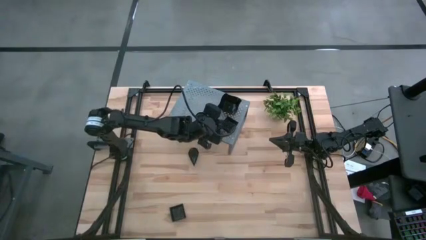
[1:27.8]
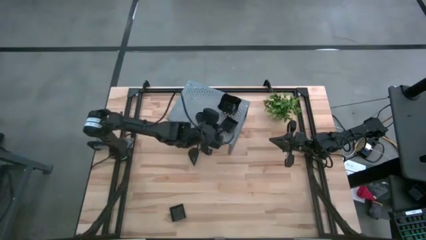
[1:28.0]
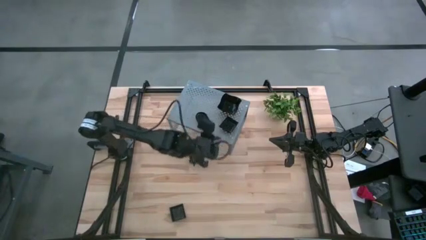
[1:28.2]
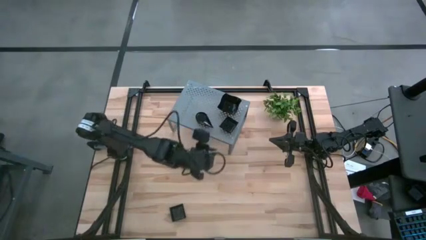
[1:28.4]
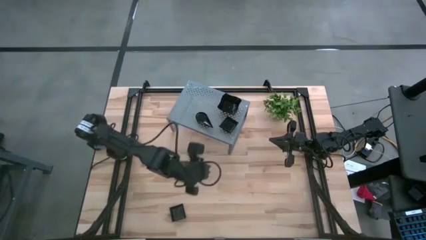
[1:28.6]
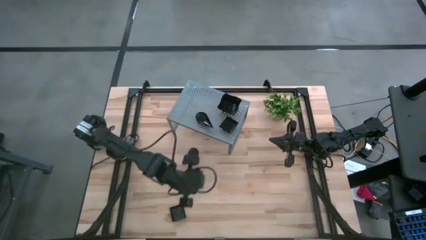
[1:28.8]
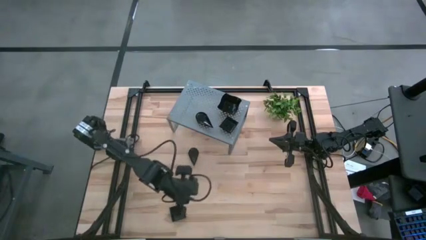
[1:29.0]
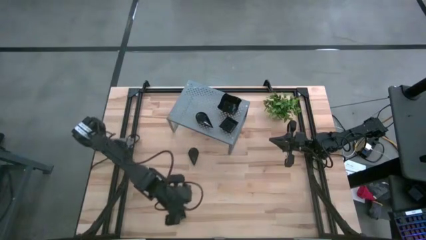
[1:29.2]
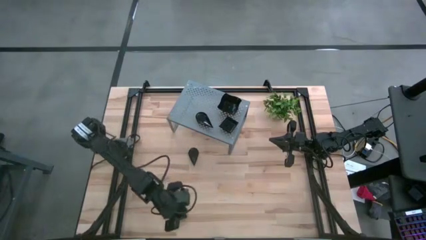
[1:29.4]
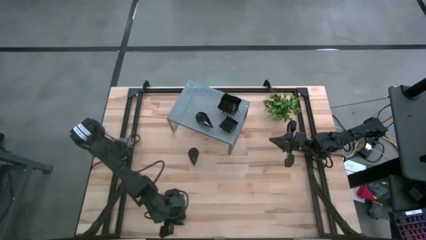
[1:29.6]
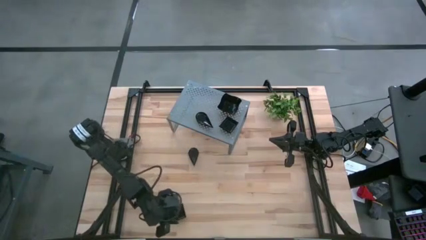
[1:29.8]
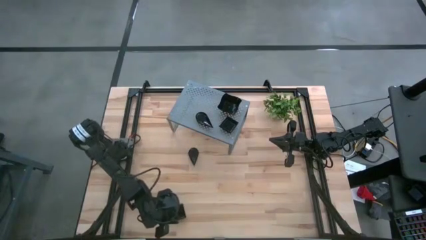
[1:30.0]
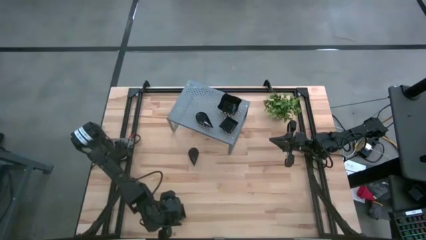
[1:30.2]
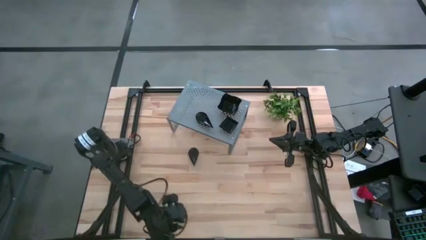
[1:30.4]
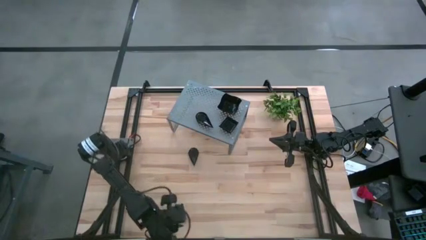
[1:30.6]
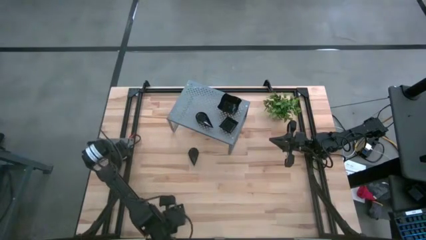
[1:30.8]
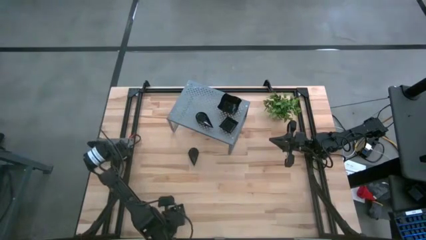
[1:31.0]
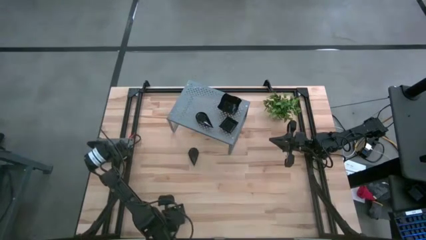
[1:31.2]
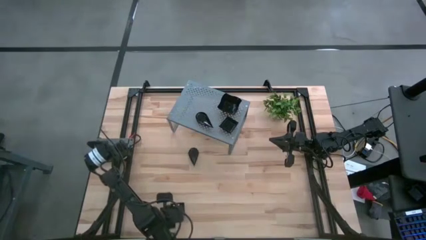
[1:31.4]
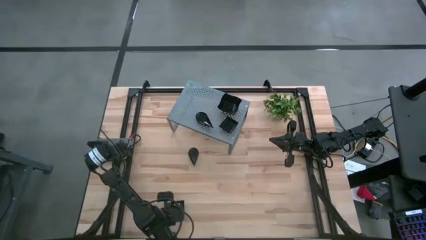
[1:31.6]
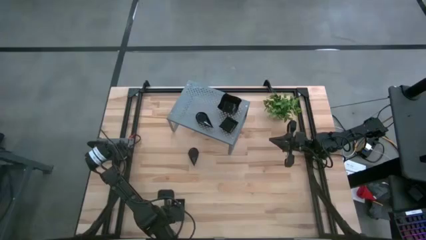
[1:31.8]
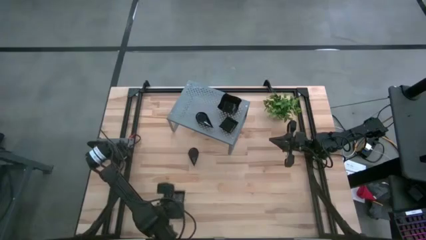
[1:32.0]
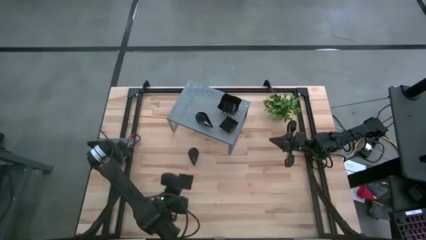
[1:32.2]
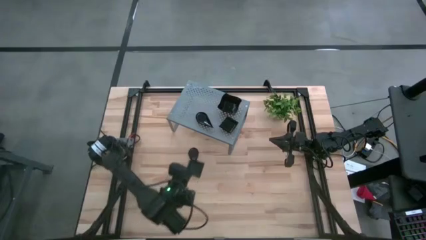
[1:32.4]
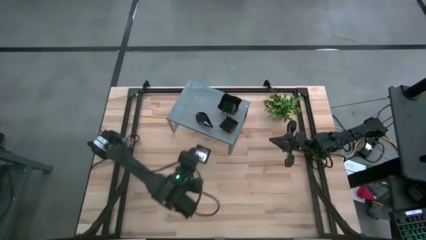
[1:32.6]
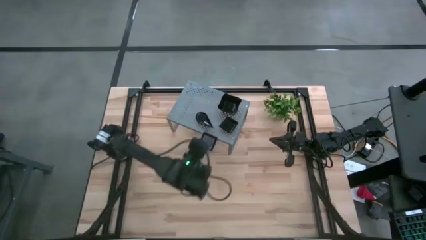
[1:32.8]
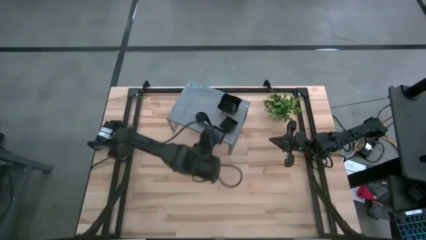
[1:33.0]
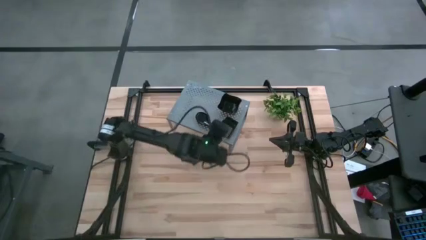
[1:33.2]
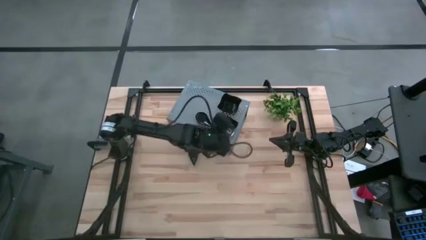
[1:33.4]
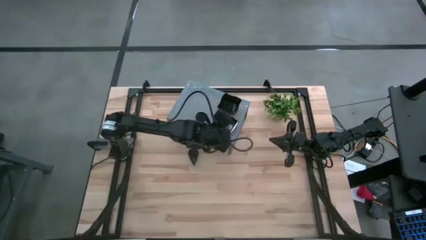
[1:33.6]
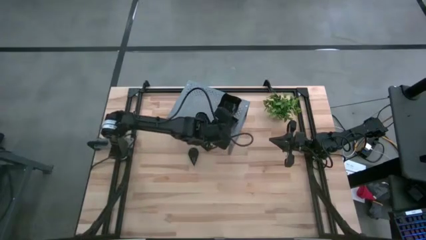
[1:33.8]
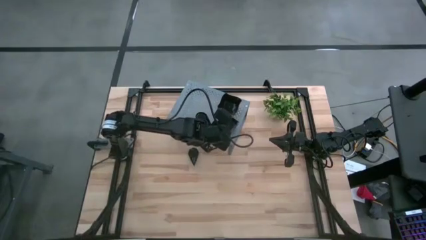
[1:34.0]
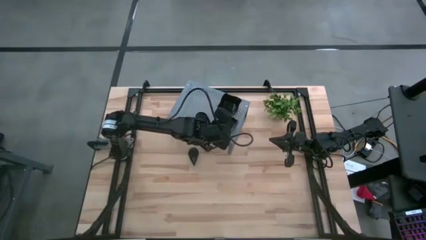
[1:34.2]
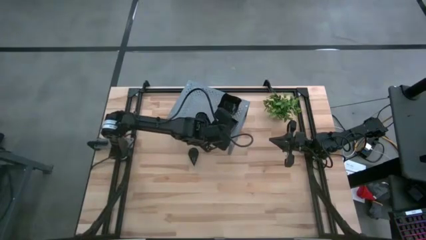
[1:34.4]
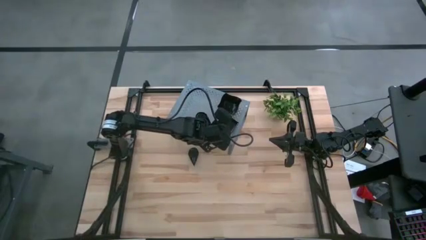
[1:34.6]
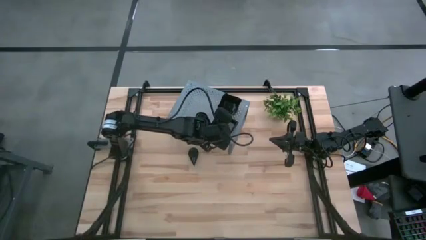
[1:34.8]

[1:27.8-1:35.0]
Task: Pick & Place Mini shaped plates
Stack the square plate into the square plate on the shelf

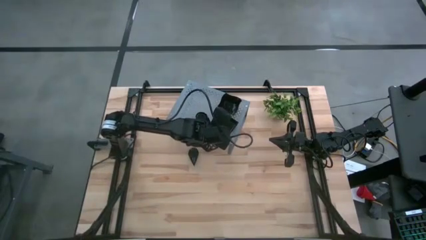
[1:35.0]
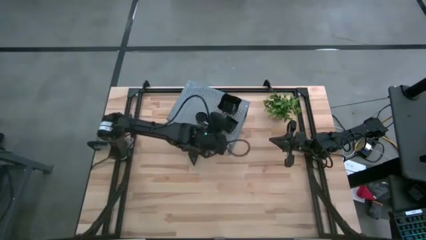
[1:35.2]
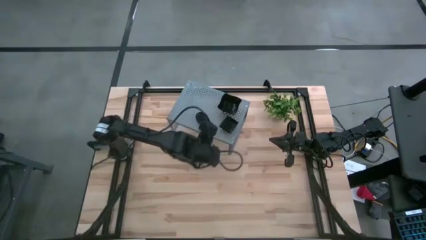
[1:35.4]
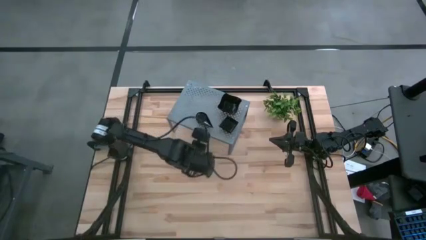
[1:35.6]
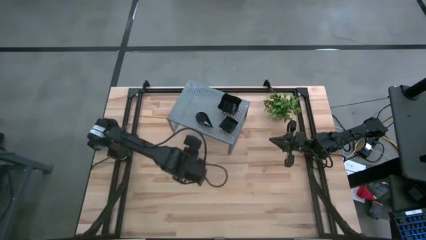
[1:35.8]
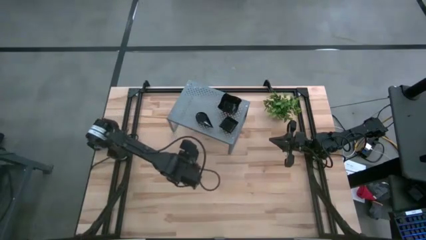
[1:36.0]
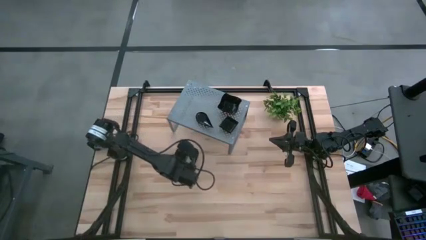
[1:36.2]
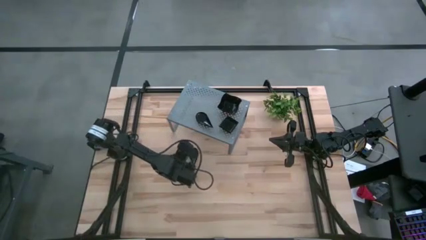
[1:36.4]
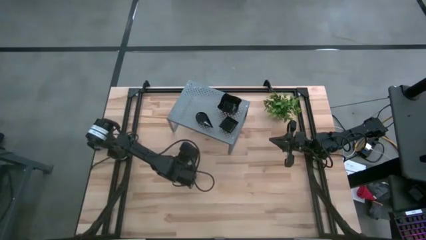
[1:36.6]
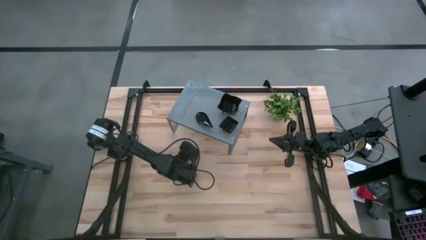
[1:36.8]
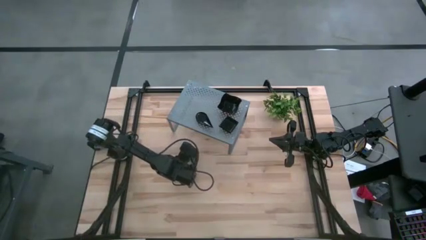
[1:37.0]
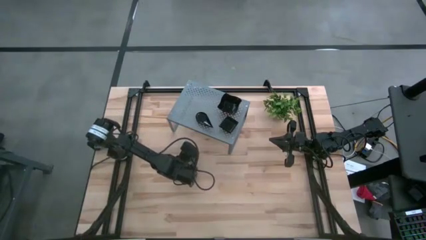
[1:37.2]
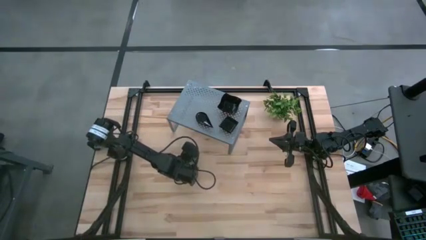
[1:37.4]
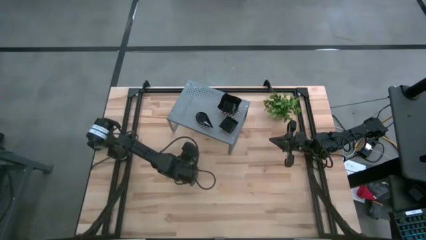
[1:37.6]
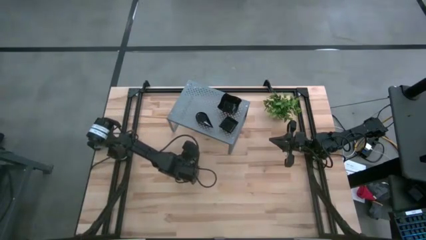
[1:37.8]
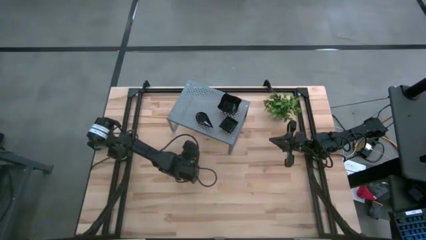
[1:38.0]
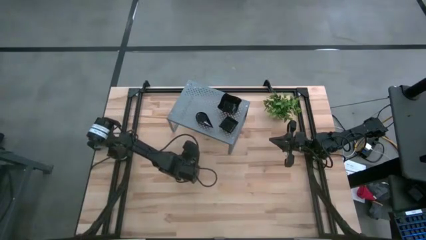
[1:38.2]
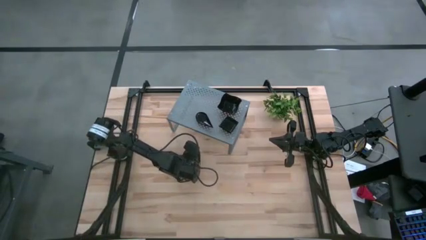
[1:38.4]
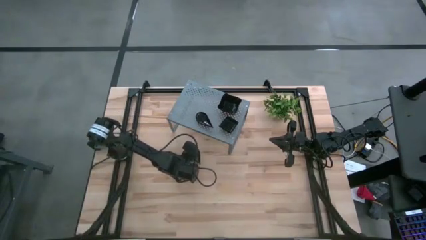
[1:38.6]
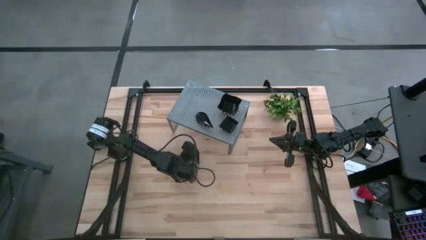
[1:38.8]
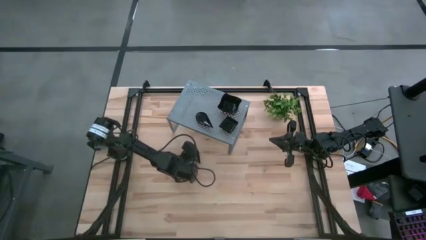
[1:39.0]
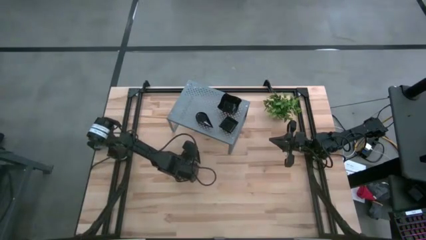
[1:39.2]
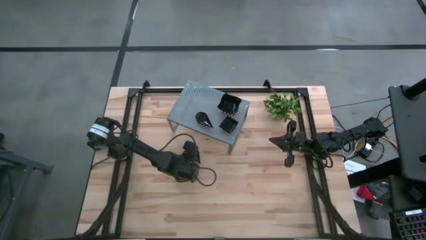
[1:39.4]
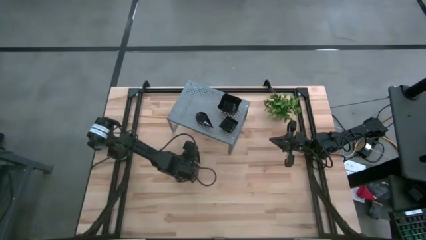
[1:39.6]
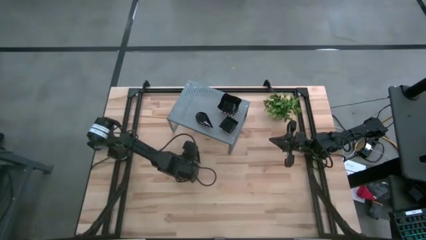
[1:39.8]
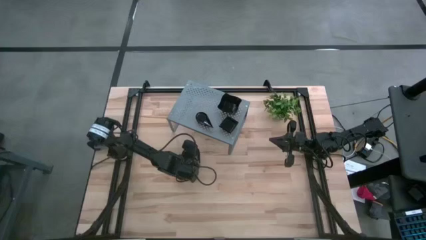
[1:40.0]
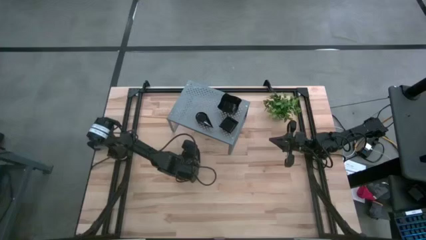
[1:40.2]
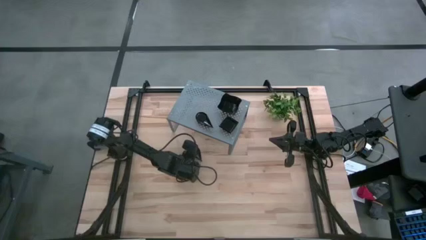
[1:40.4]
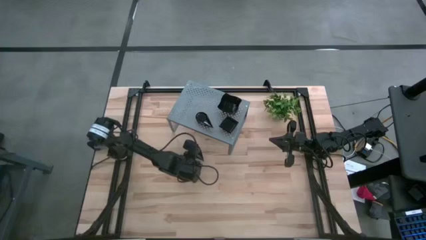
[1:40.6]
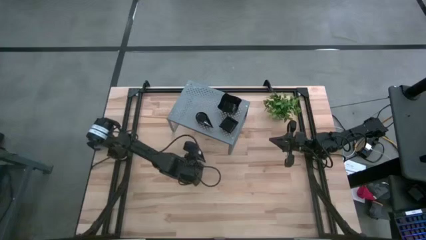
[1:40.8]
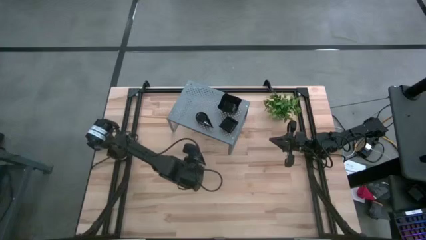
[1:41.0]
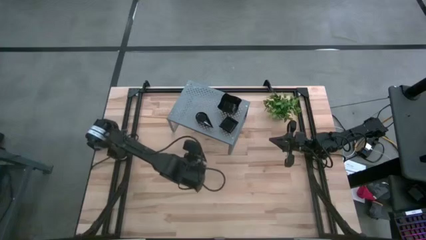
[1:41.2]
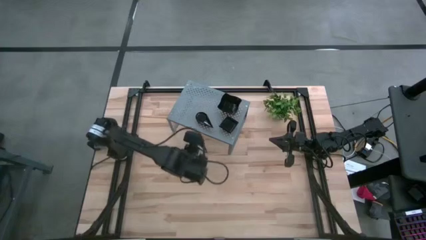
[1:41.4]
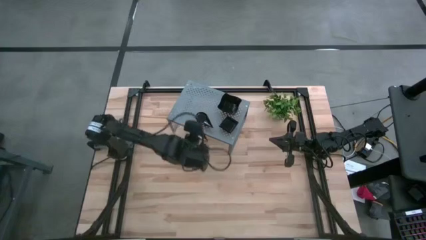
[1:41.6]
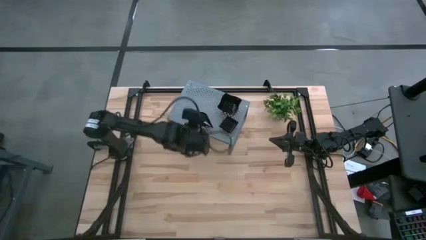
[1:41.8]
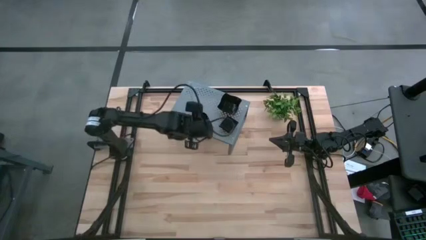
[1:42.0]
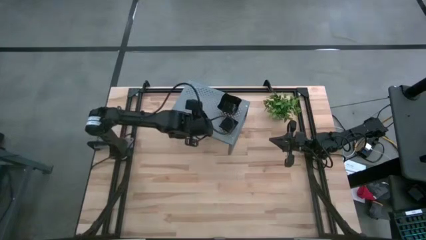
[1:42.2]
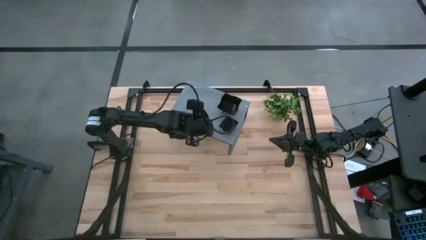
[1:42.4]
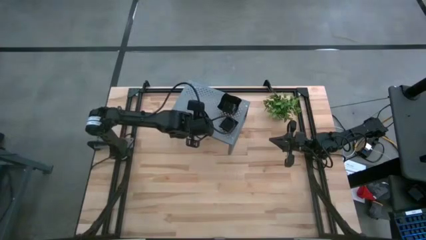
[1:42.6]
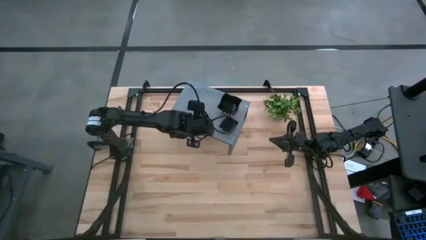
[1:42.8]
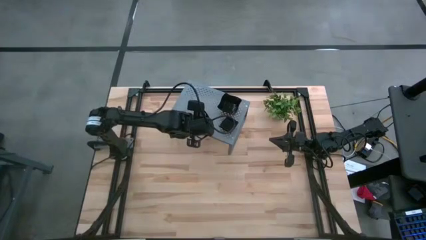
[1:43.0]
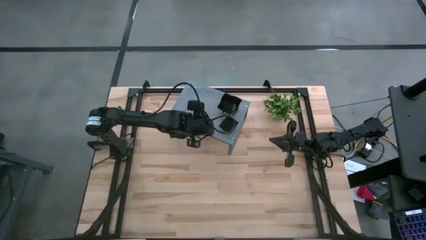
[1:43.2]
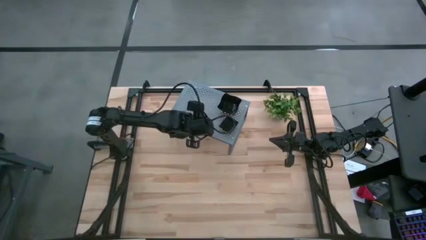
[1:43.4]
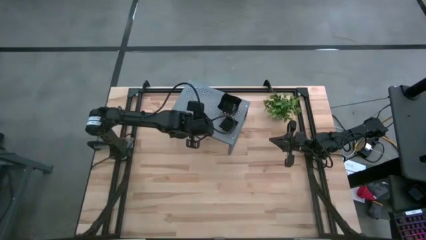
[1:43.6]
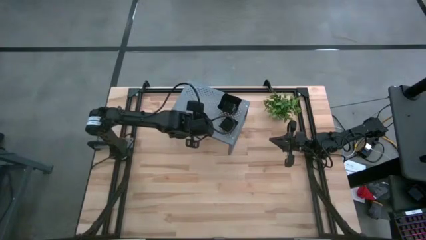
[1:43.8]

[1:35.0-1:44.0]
Stack the drop shaped plate into the drop shaped plate on the shelf
